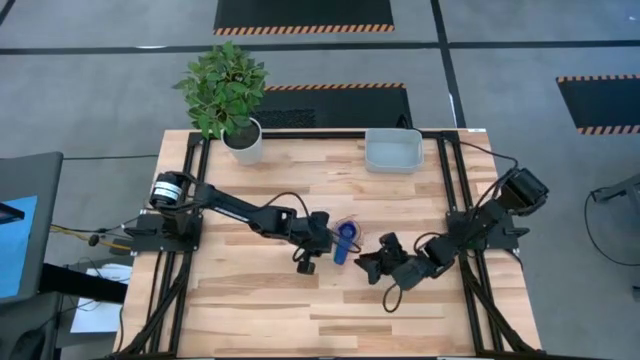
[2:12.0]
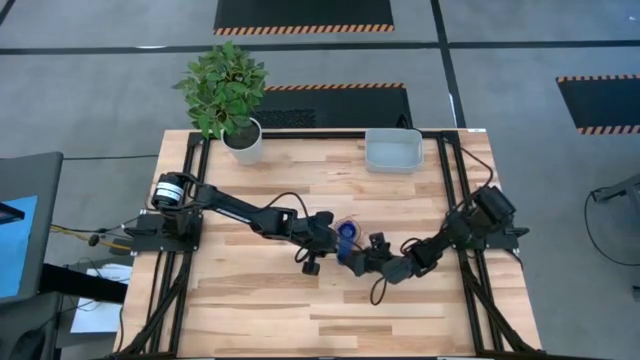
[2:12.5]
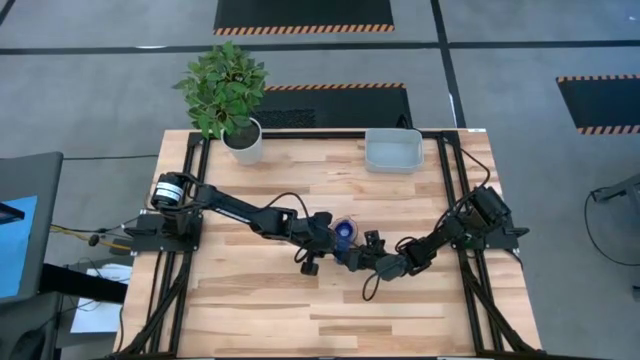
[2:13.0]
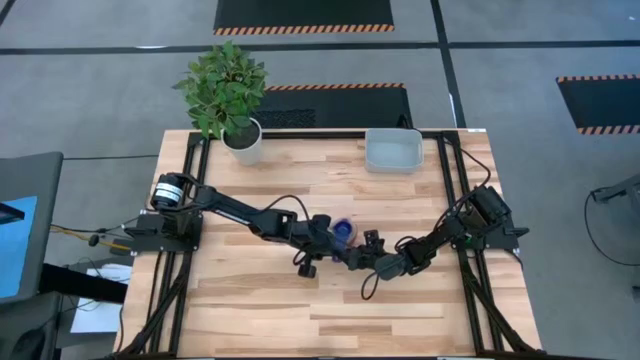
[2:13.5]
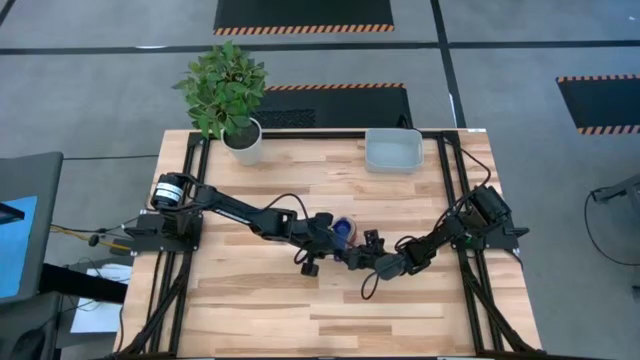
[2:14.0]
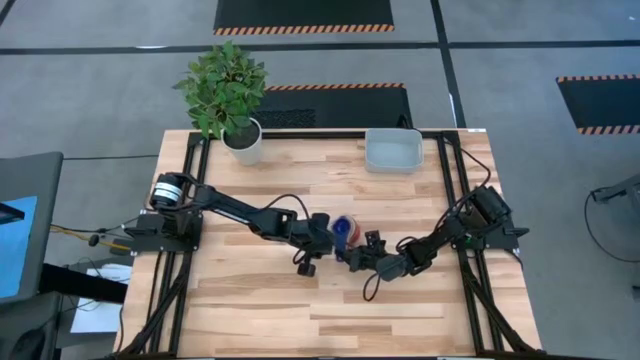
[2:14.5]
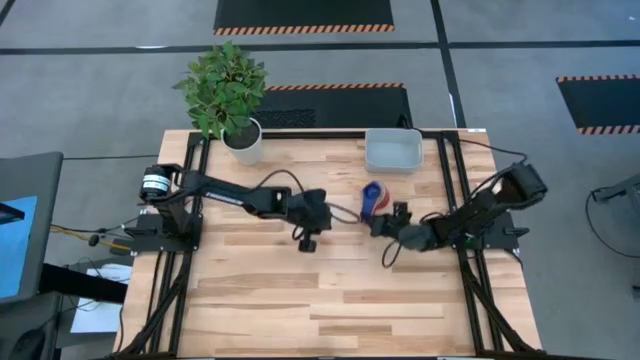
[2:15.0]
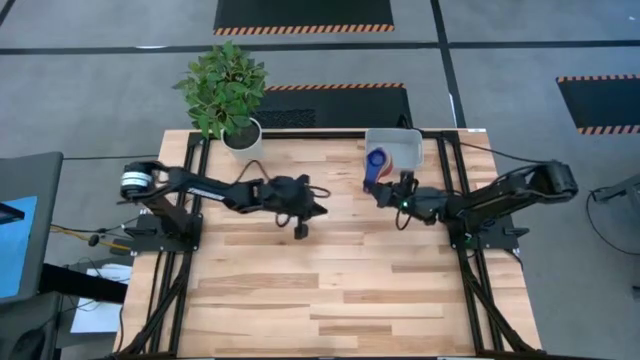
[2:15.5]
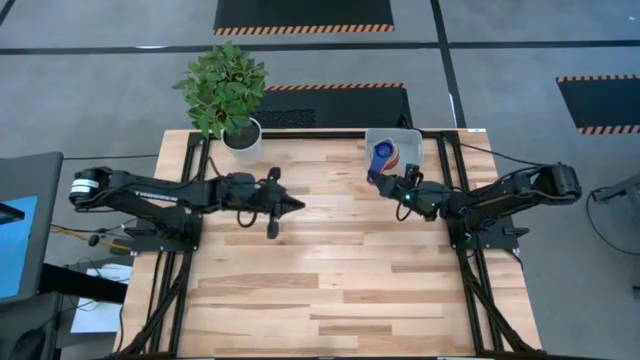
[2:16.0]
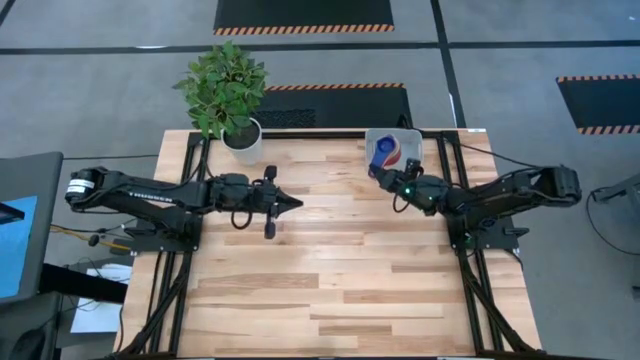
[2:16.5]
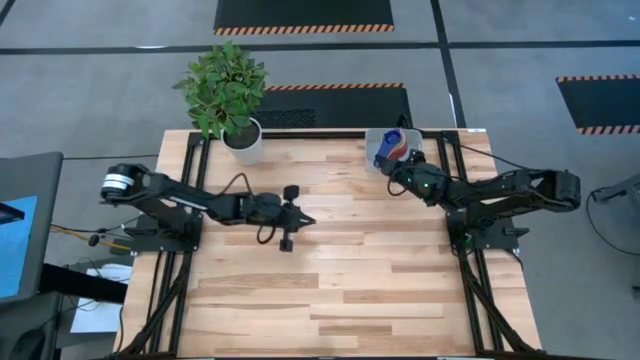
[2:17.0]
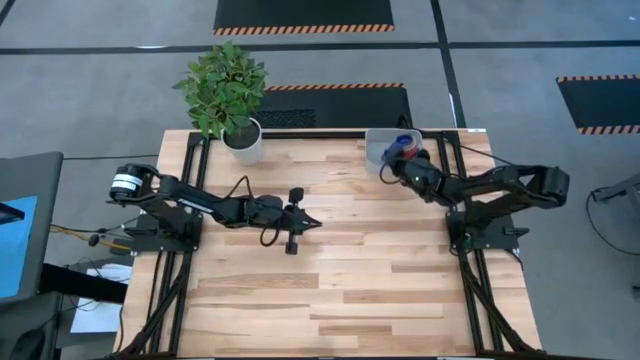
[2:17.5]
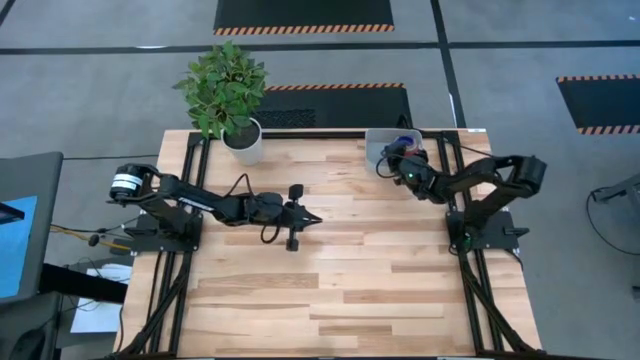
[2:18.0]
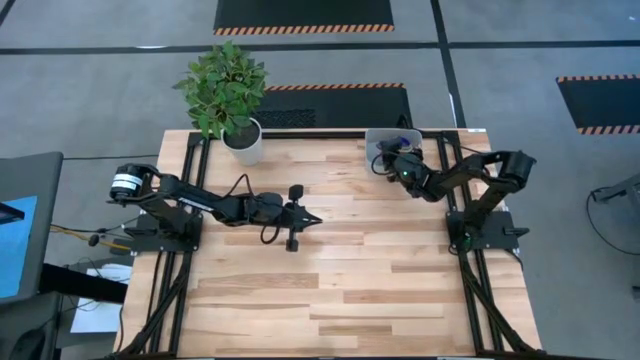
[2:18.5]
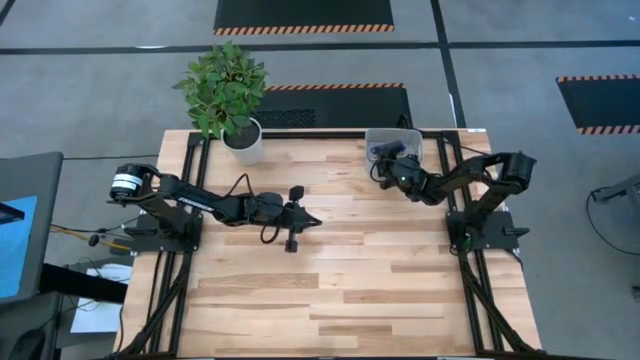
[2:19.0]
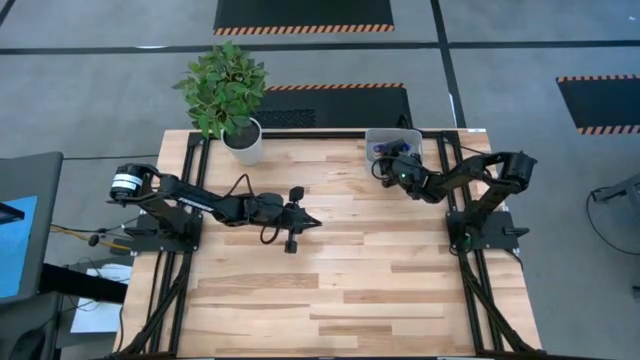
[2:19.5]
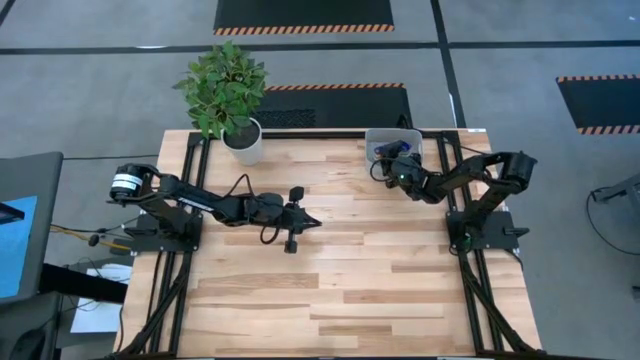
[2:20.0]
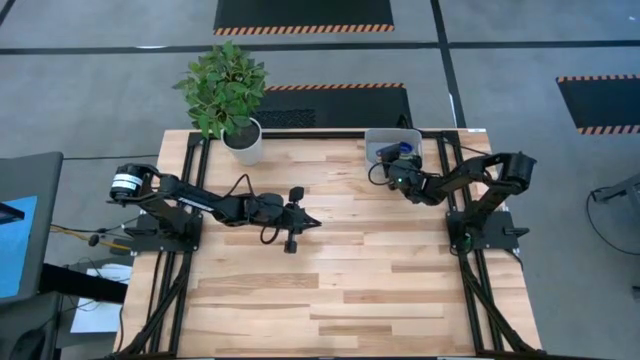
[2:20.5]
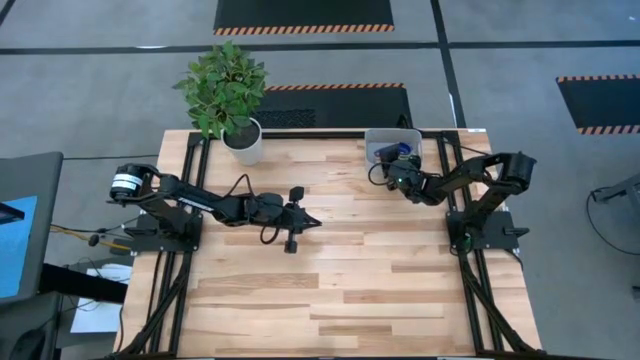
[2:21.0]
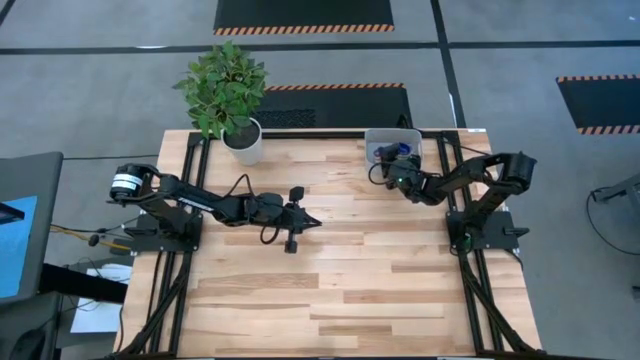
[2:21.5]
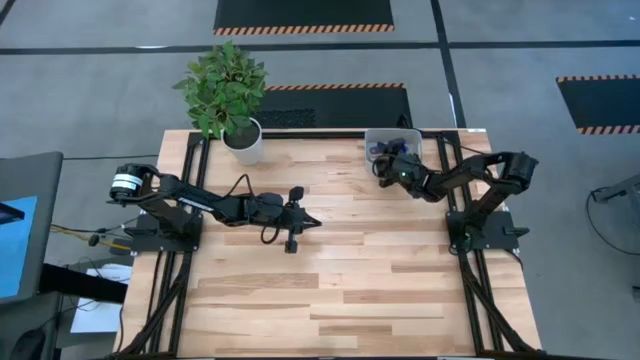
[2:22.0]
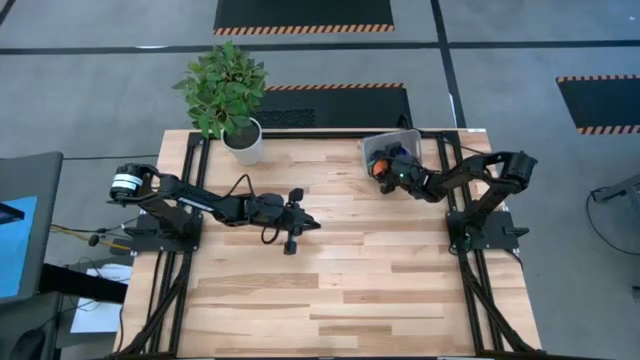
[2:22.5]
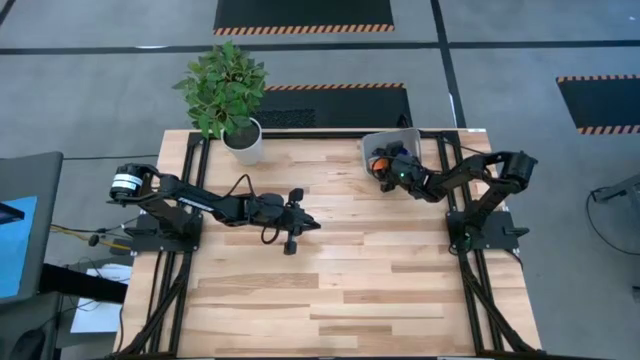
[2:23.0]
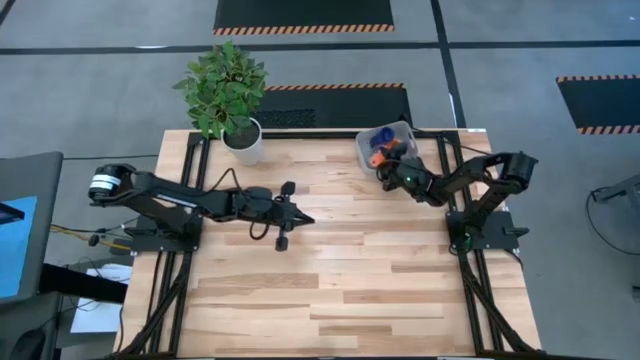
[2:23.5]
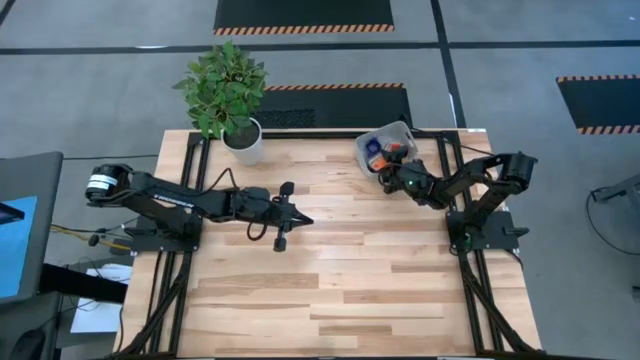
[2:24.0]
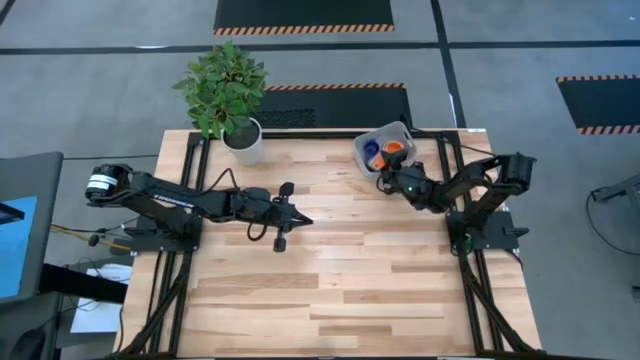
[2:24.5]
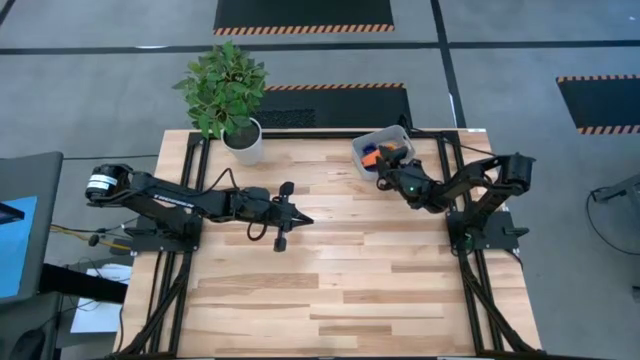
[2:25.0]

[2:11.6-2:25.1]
Task: Nest measuring cups in basket
Put the stacked measuring cups into the gray bin

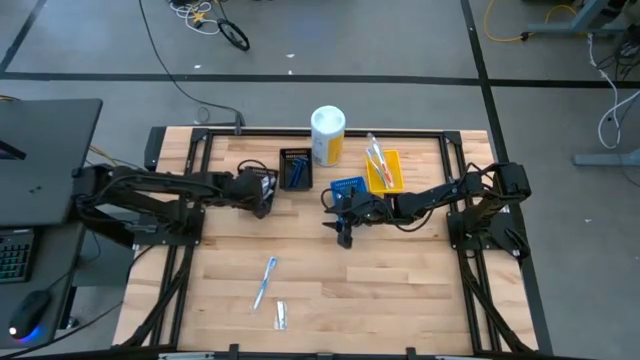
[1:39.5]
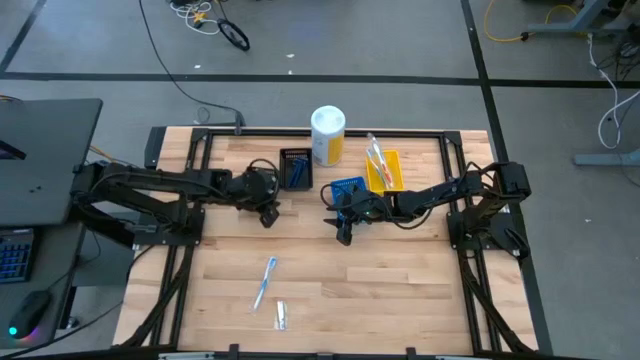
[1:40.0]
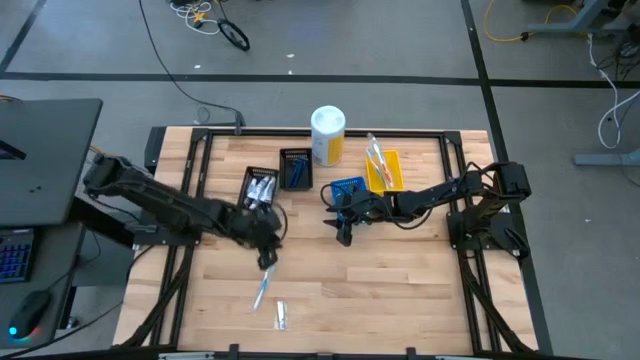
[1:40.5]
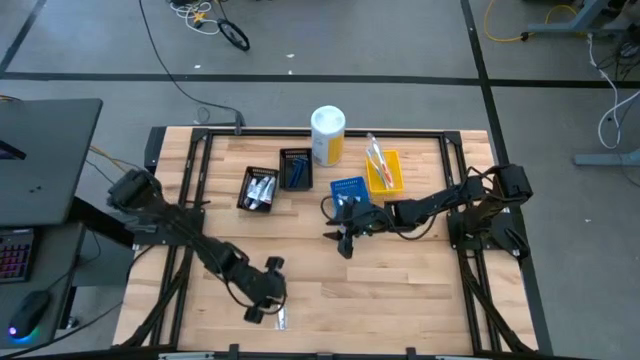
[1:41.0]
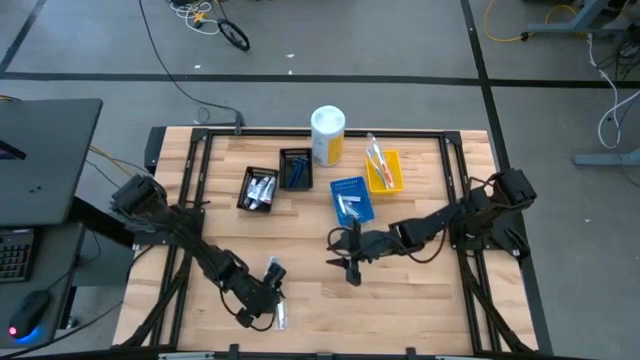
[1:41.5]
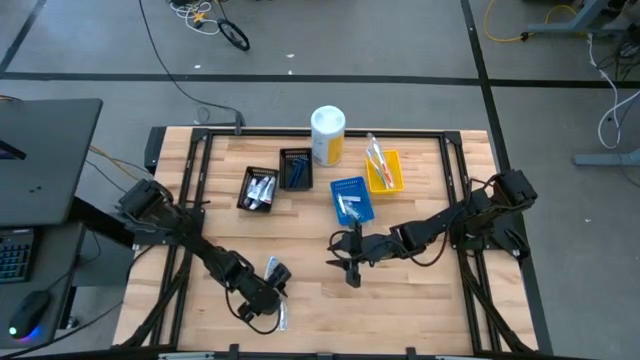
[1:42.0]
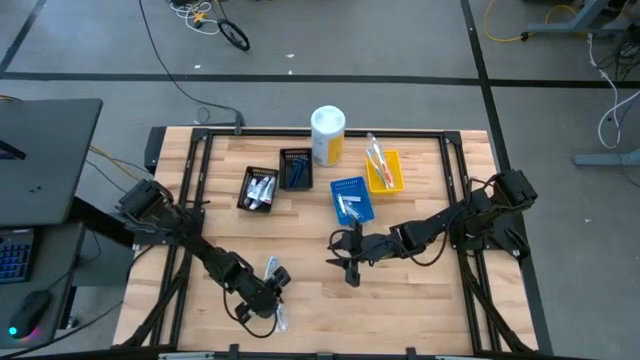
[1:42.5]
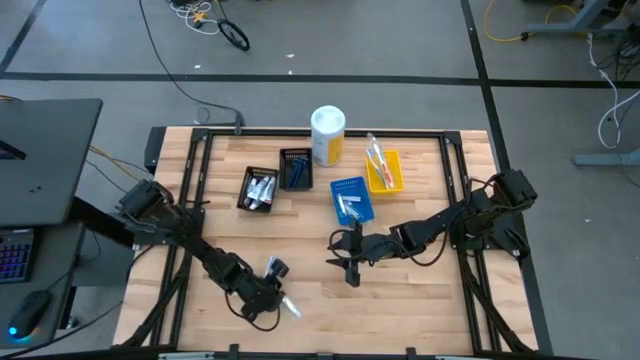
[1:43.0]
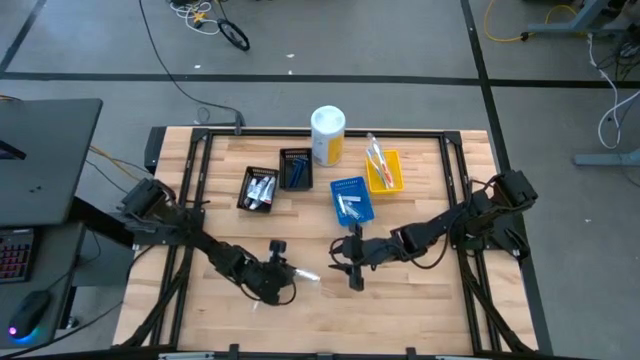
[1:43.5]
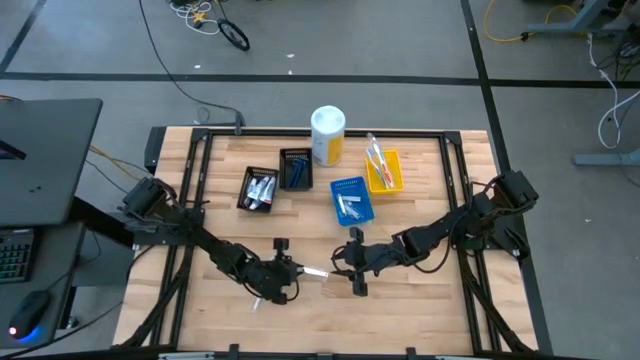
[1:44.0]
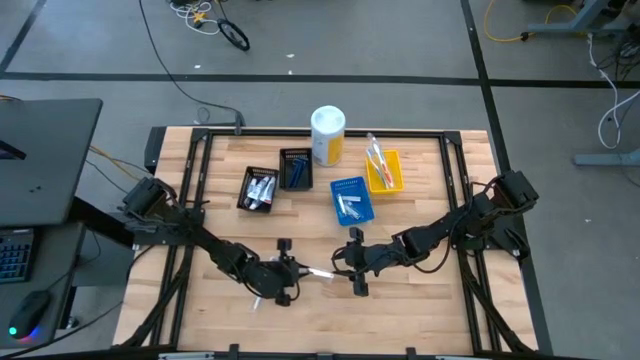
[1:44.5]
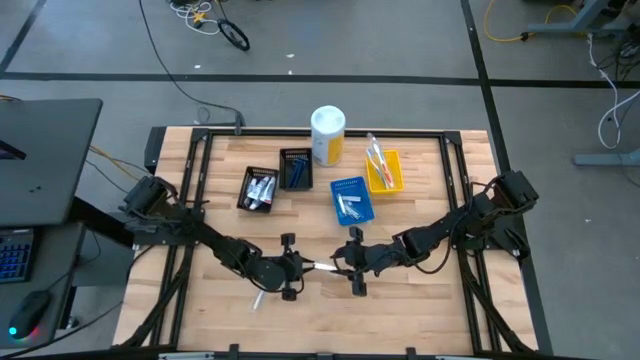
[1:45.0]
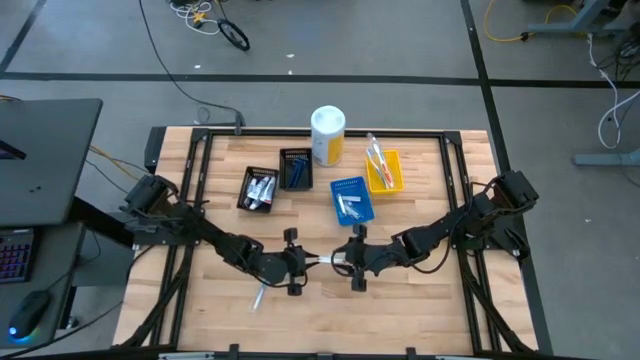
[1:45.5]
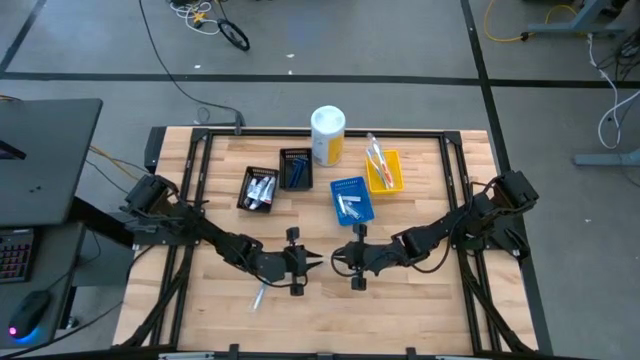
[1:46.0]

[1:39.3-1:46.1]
Task: Pick & Place Travel size toiletries
Put the silver nail cutter into the blue bin
